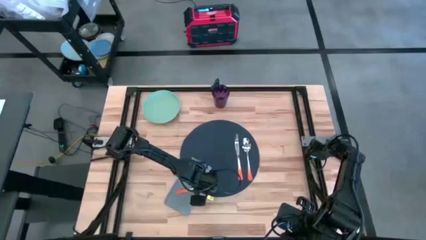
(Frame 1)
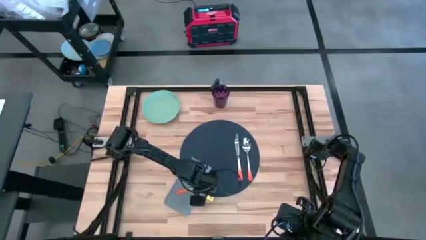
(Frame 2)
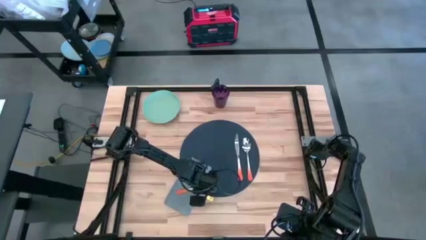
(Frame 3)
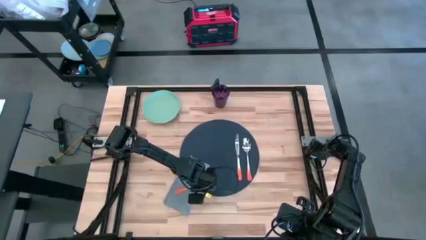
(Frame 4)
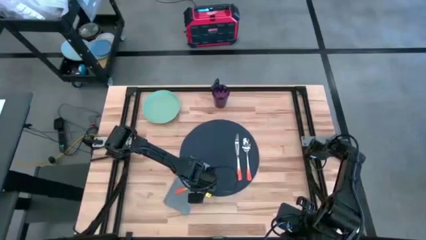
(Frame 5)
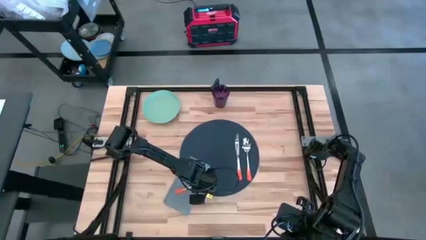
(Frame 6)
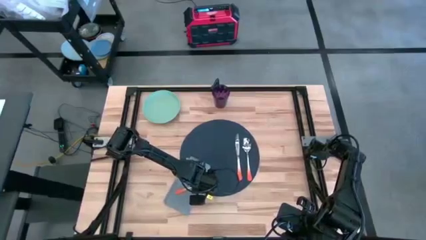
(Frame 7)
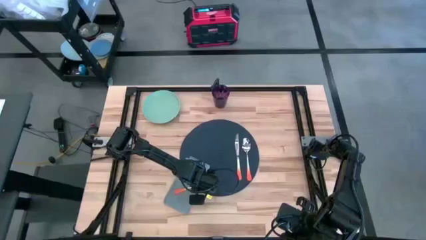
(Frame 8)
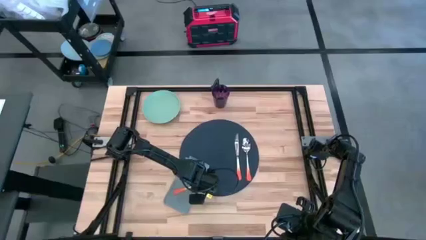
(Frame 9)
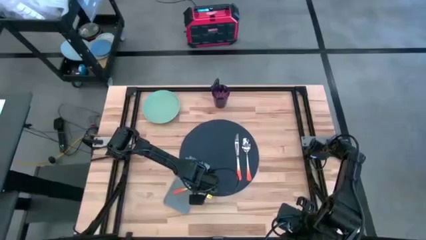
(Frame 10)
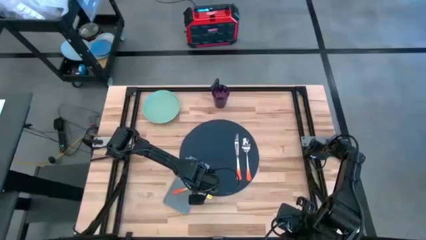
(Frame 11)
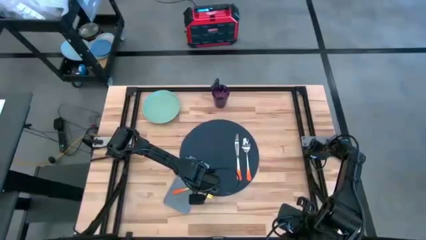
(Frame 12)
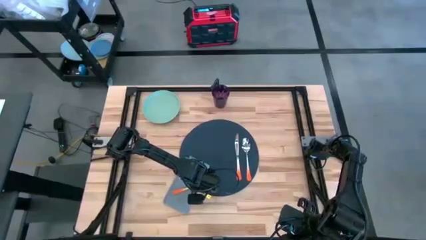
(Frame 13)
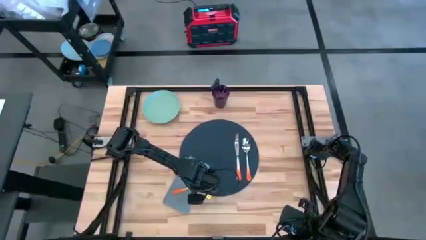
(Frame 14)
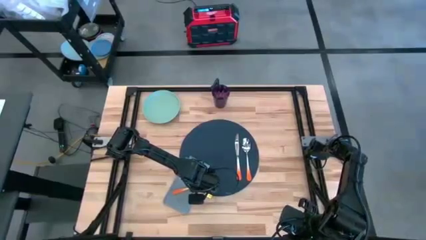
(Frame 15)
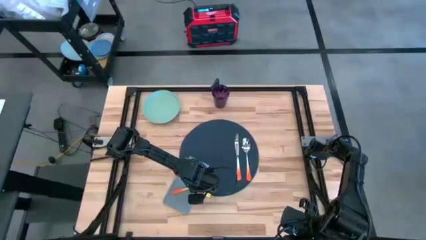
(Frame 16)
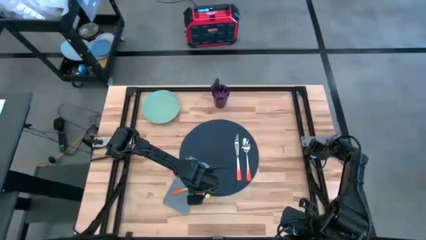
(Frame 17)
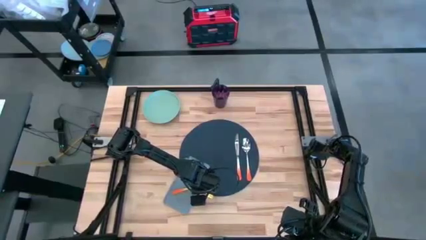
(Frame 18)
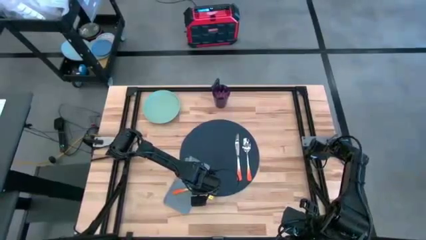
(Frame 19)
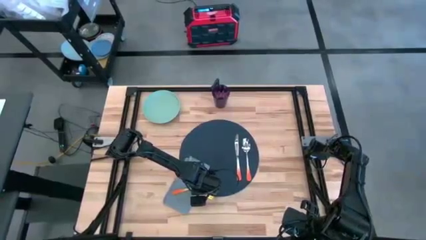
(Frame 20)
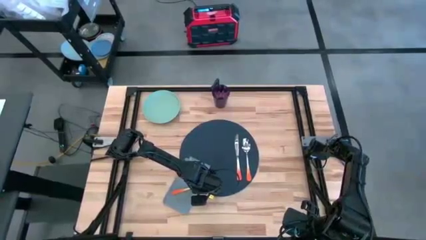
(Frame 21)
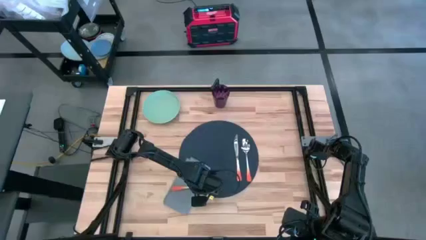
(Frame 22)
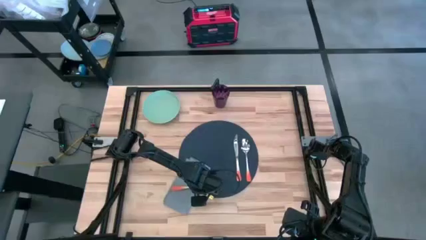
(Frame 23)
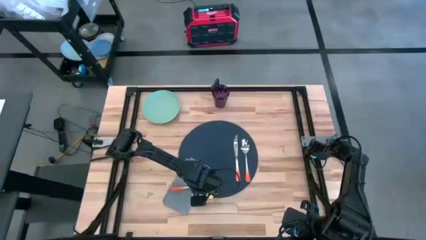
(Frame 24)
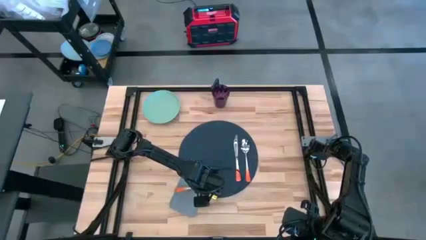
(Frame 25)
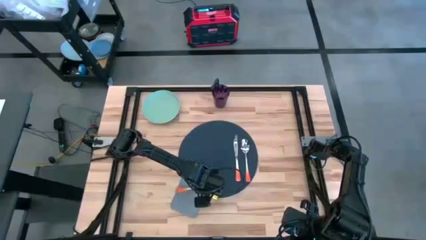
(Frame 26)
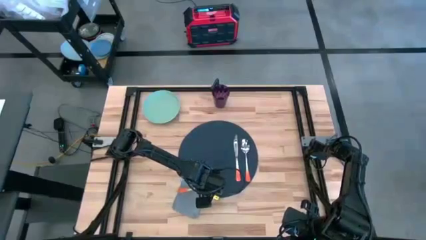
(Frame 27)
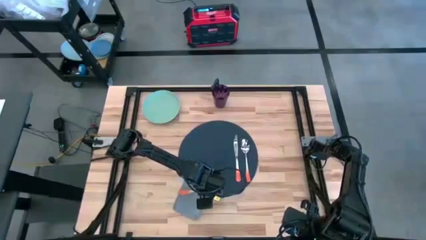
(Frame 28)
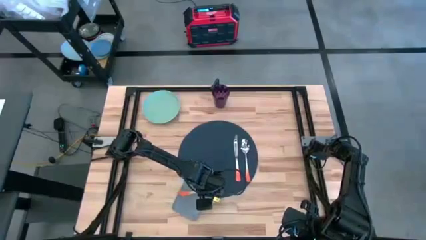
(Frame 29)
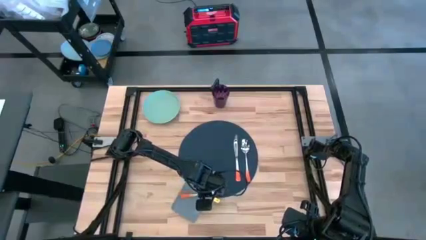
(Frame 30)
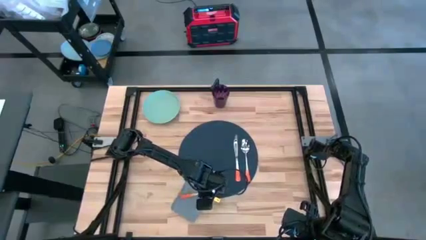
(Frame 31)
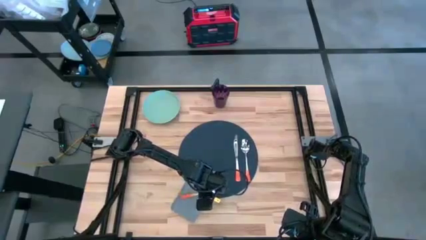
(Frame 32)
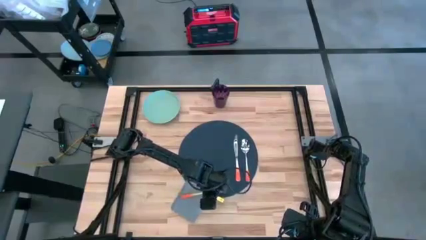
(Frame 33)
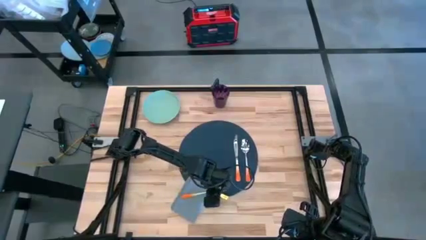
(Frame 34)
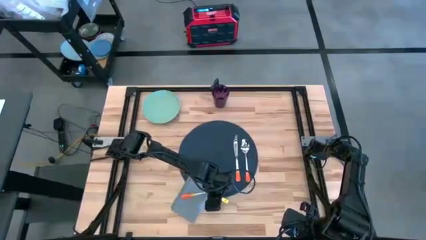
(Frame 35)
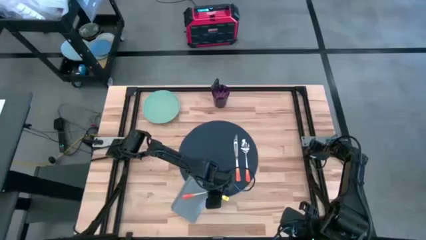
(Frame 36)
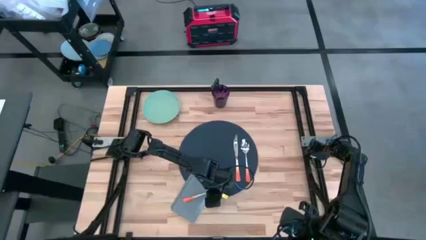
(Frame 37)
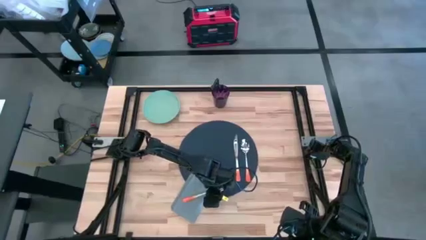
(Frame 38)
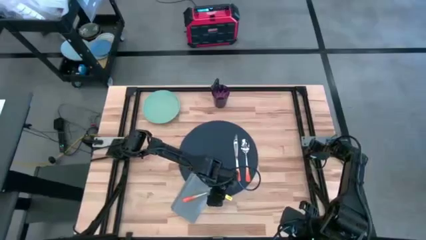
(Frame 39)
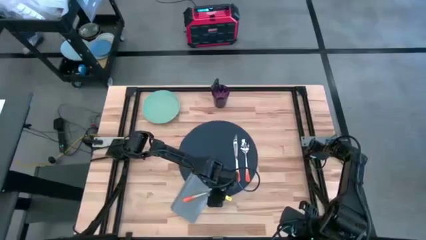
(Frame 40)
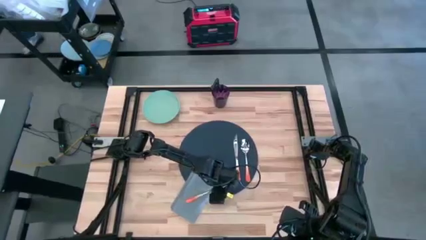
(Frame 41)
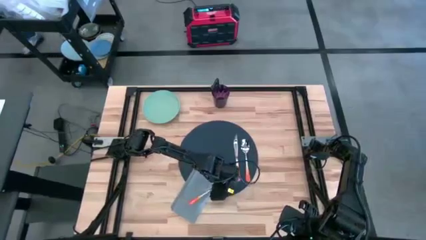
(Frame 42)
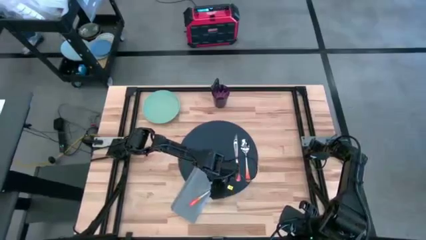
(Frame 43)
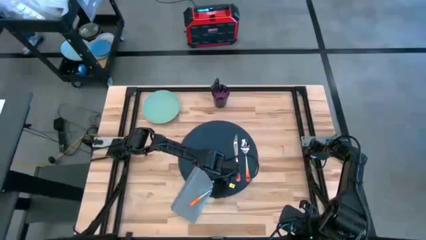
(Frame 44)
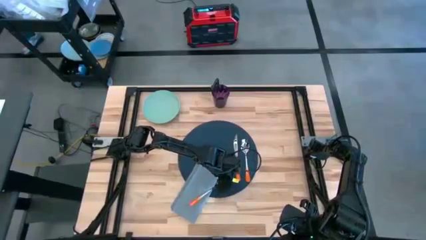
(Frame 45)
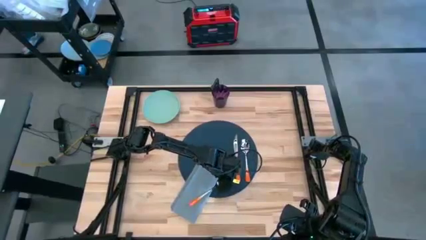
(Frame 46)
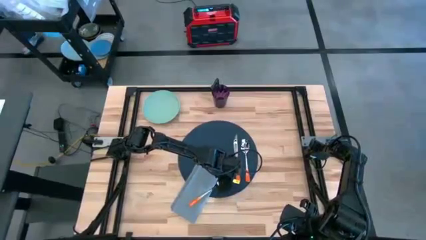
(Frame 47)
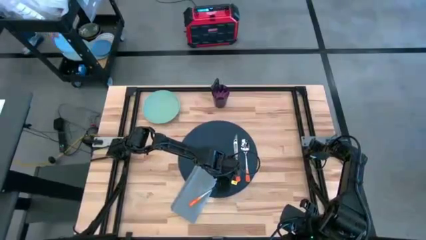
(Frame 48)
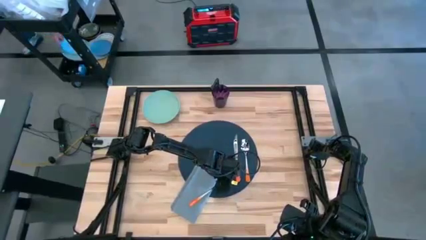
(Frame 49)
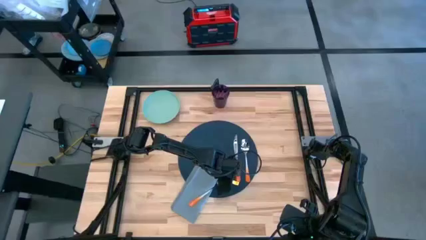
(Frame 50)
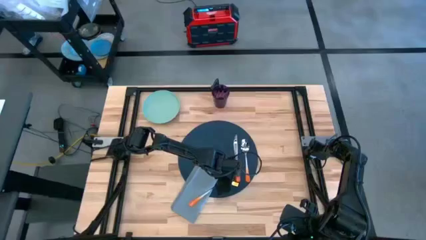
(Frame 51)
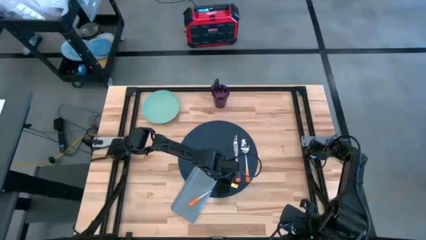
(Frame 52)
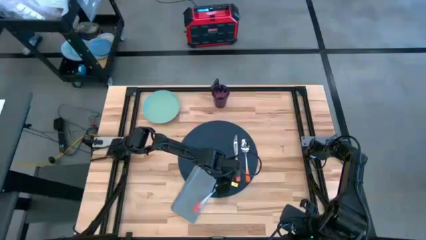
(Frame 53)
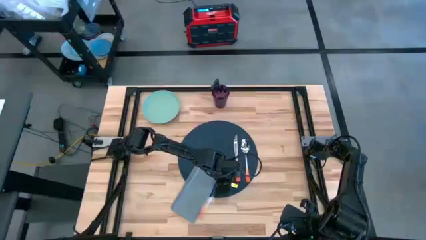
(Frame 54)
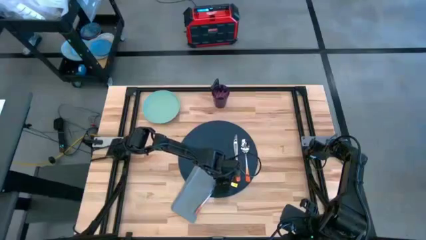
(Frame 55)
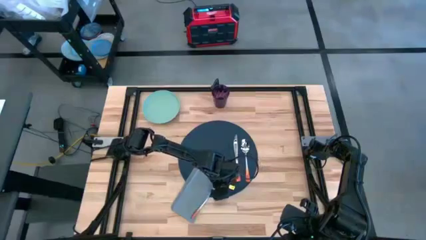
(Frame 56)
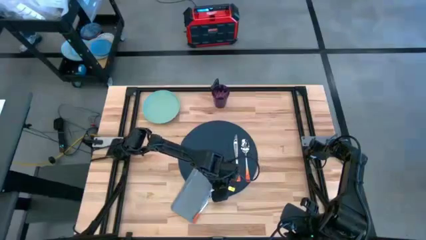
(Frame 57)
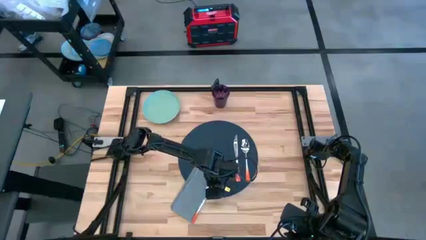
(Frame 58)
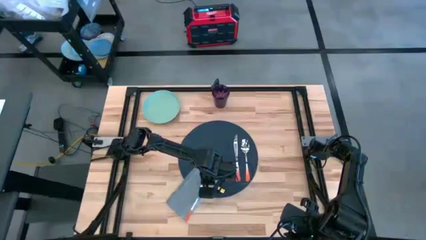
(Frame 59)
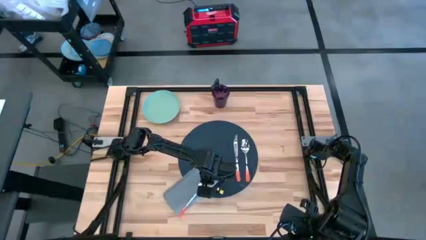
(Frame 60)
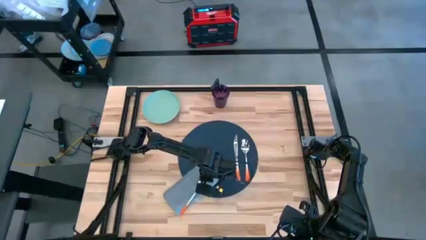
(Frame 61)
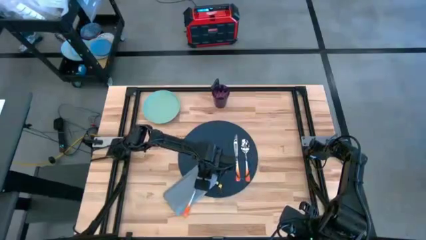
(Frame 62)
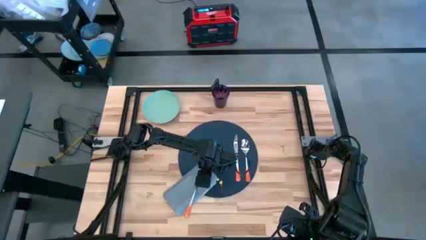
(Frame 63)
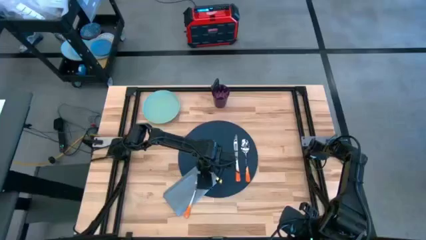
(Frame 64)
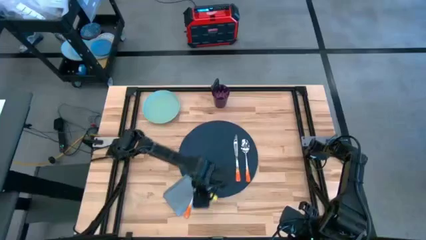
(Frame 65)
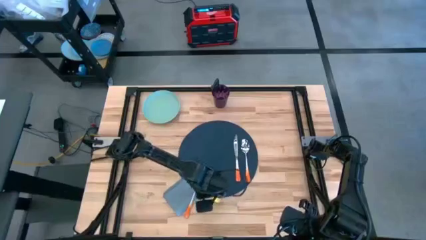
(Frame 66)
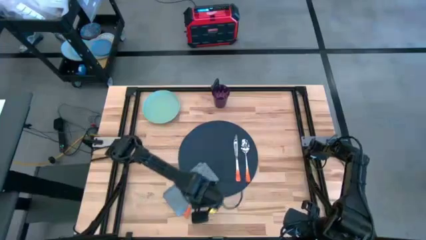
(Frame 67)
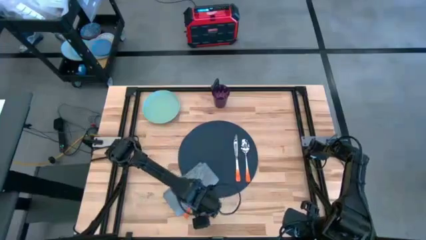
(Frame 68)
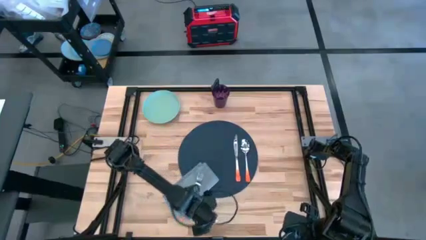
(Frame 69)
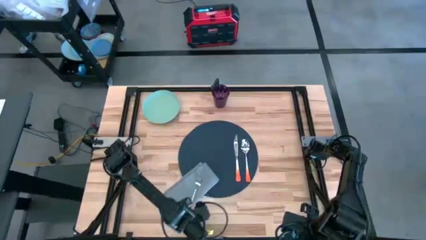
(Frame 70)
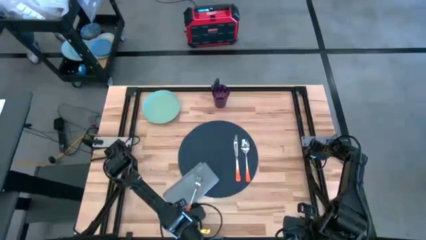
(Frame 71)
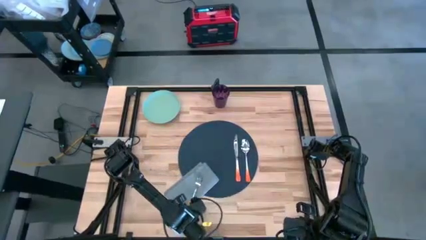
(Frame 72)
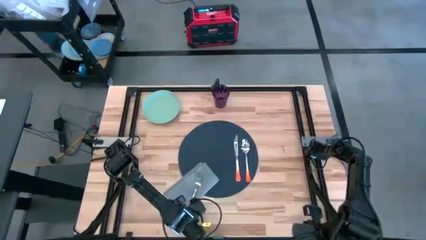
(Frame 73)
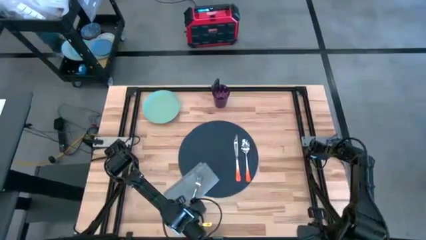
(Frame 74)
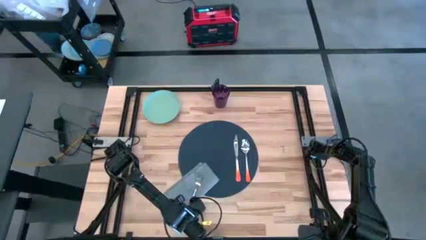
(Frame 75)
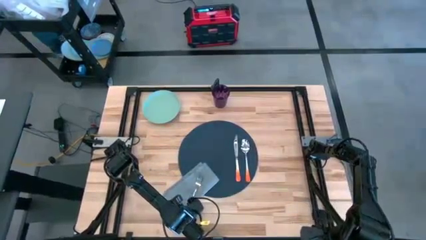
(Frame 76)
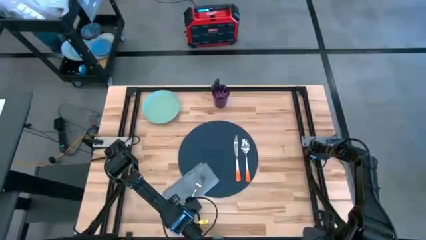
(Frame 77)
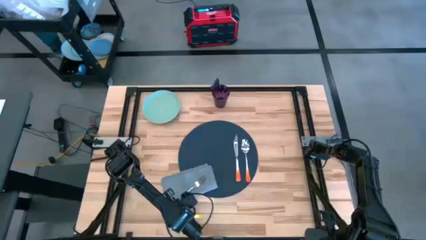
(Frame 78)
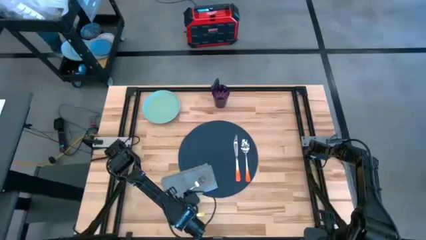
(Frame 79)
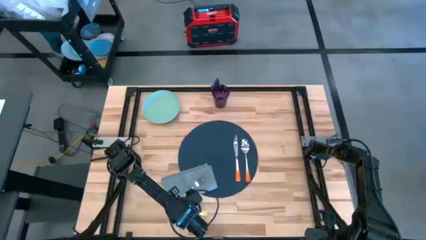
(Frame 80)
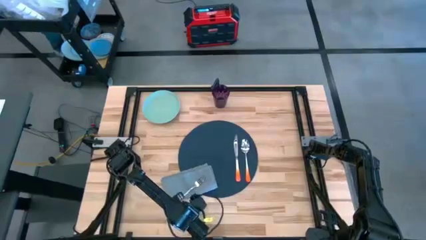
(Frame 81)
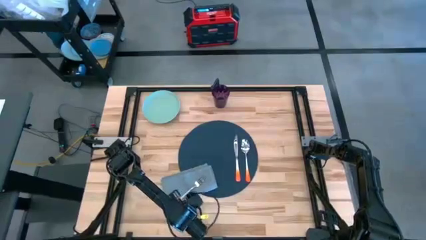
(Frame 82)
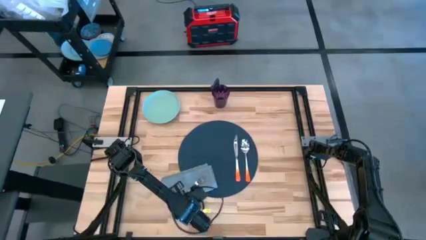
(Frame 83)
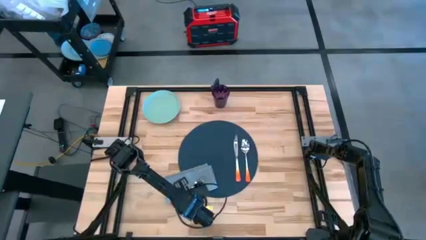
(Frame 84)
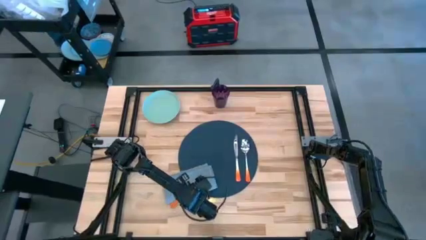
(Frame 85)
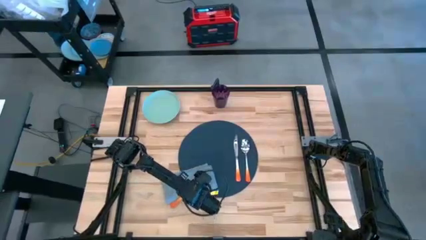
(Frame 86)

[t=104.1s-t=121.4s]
Task: Set table place
Put the orange fork on the table napkin
